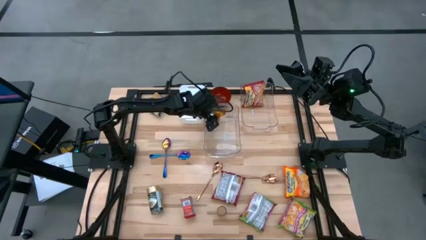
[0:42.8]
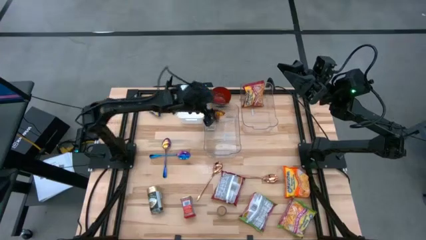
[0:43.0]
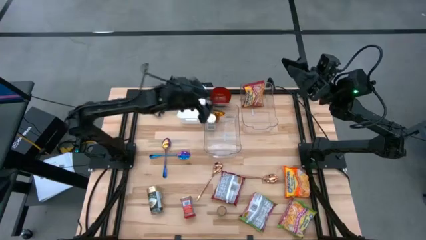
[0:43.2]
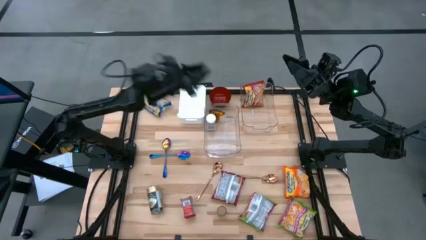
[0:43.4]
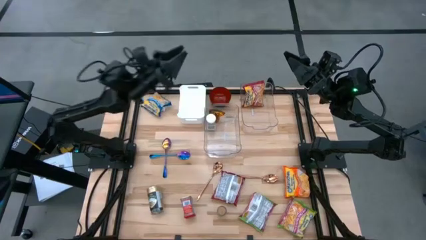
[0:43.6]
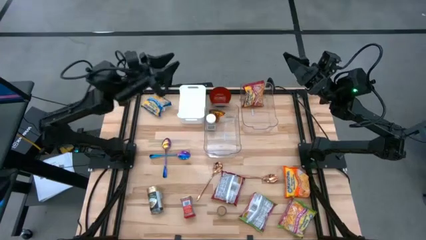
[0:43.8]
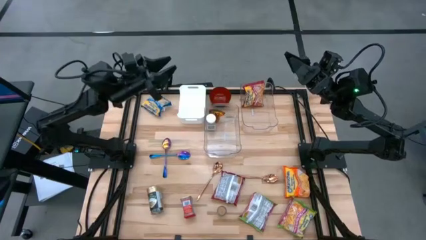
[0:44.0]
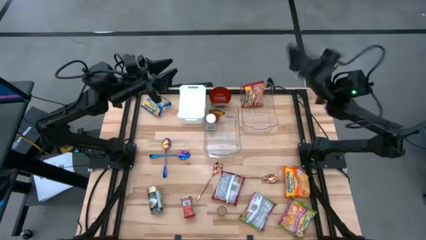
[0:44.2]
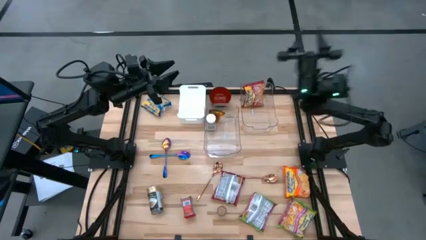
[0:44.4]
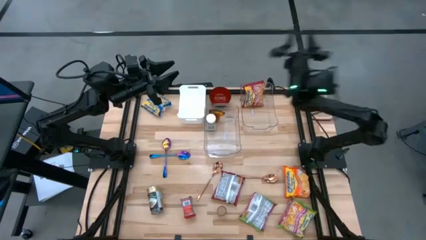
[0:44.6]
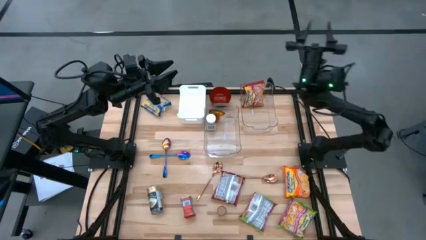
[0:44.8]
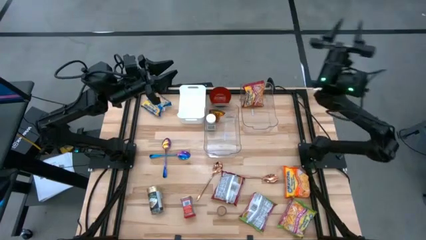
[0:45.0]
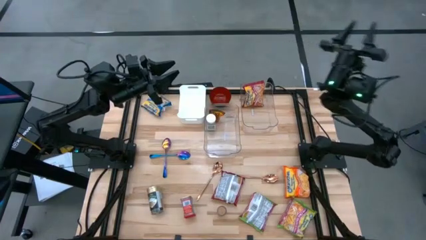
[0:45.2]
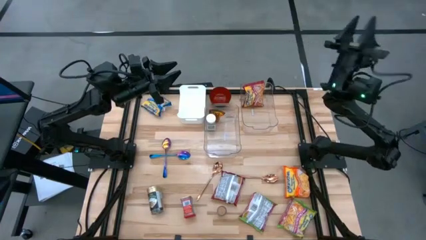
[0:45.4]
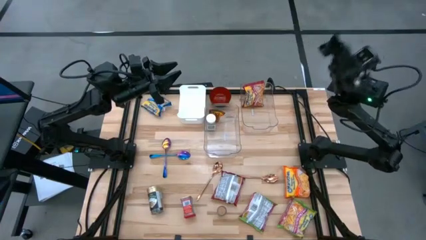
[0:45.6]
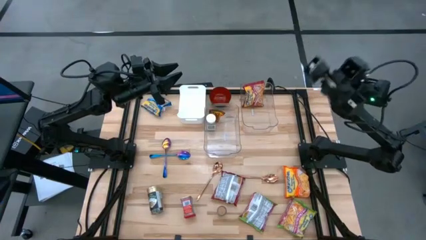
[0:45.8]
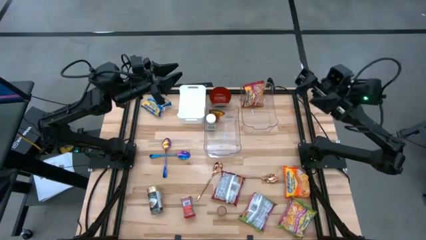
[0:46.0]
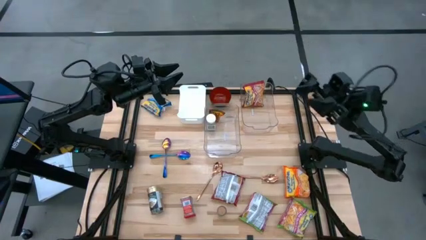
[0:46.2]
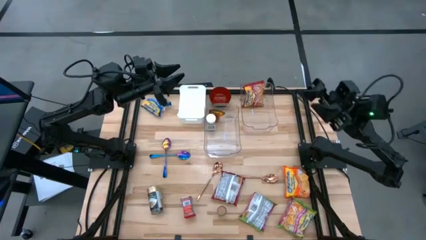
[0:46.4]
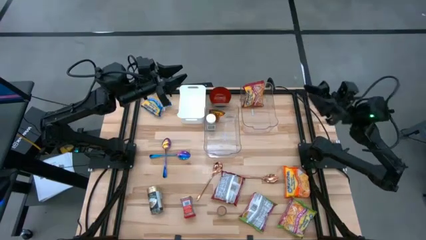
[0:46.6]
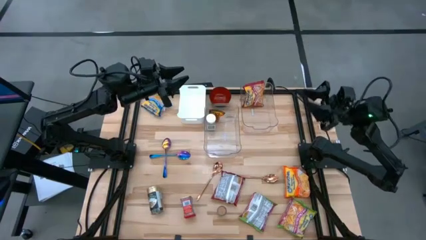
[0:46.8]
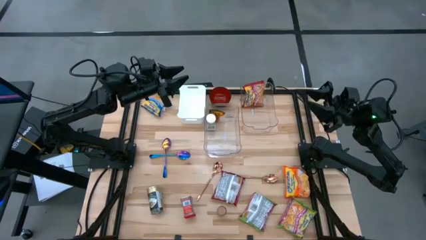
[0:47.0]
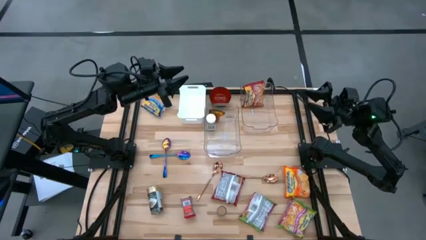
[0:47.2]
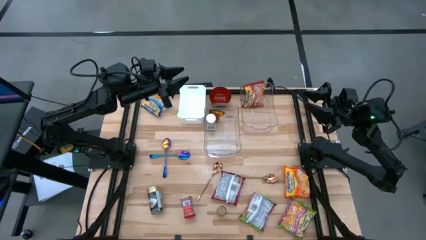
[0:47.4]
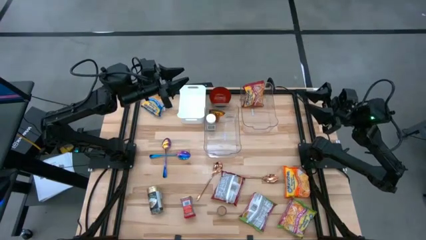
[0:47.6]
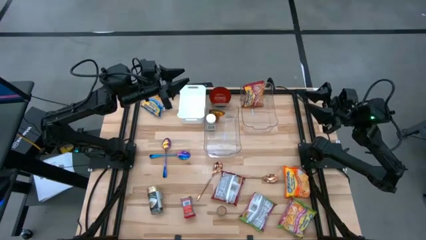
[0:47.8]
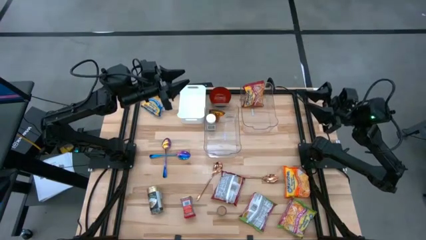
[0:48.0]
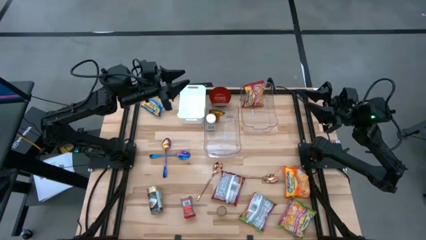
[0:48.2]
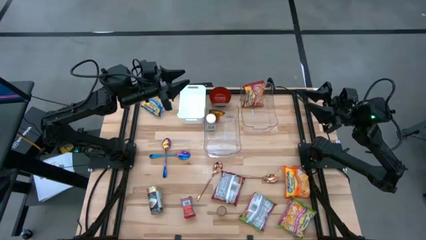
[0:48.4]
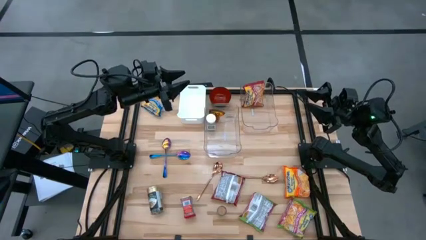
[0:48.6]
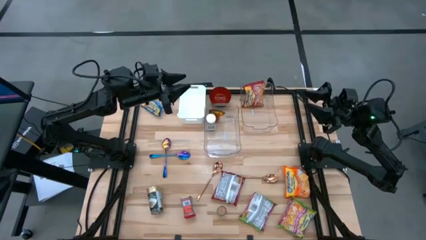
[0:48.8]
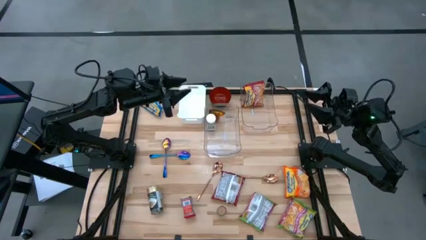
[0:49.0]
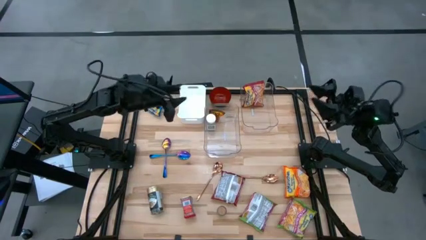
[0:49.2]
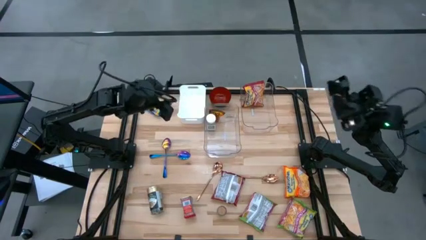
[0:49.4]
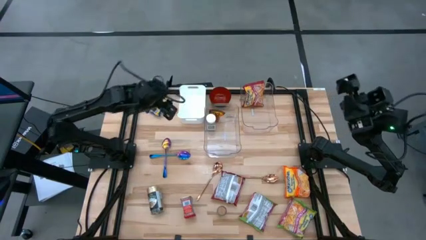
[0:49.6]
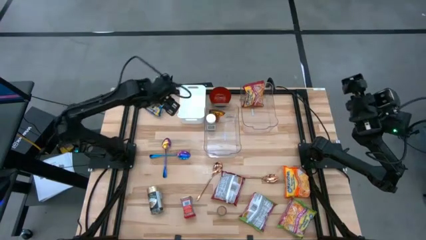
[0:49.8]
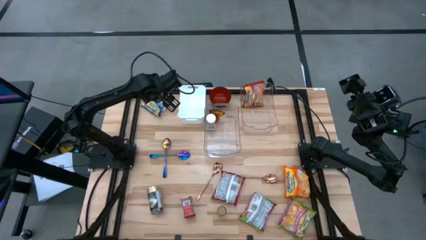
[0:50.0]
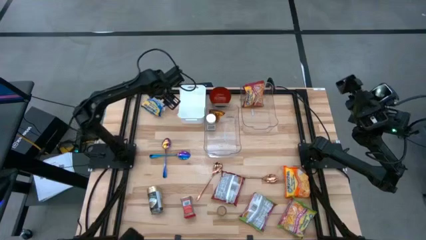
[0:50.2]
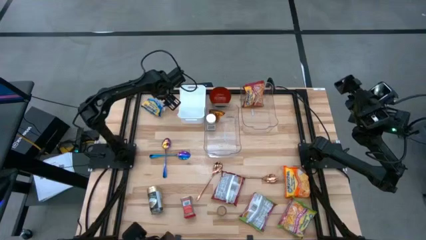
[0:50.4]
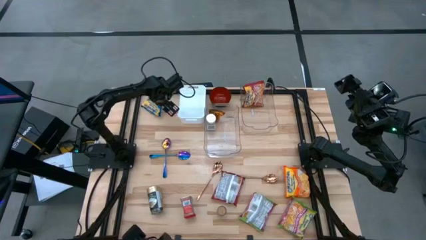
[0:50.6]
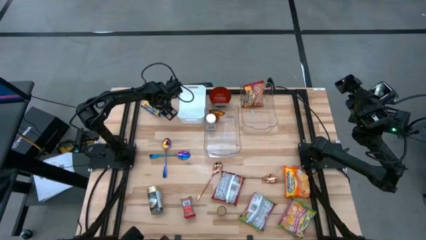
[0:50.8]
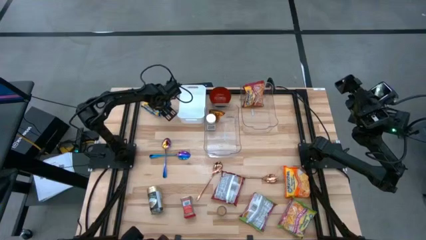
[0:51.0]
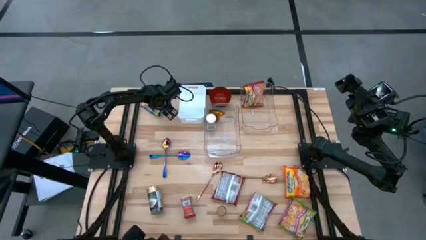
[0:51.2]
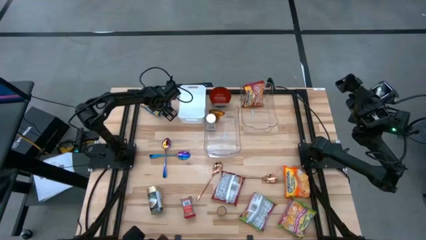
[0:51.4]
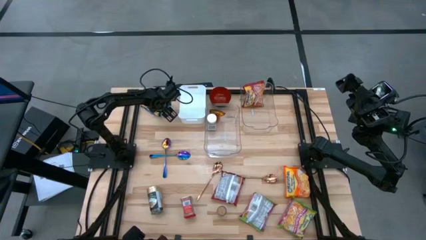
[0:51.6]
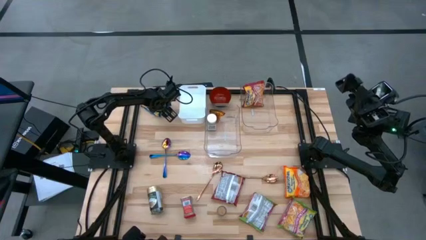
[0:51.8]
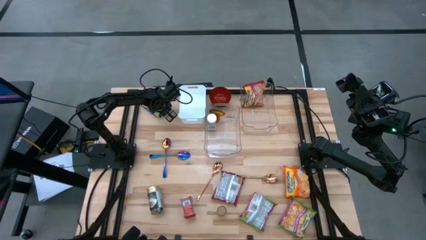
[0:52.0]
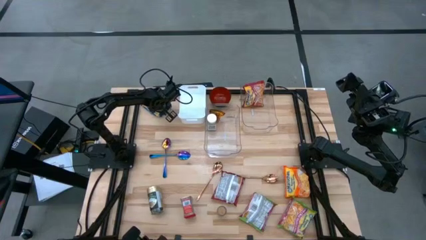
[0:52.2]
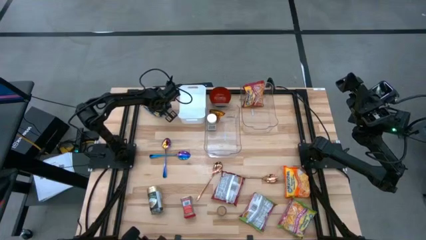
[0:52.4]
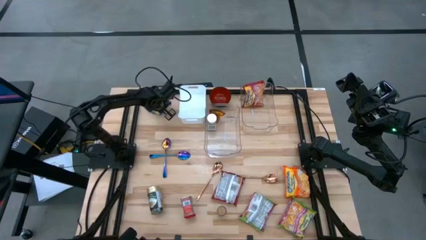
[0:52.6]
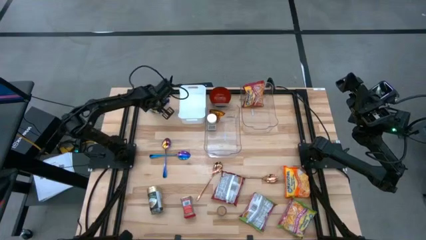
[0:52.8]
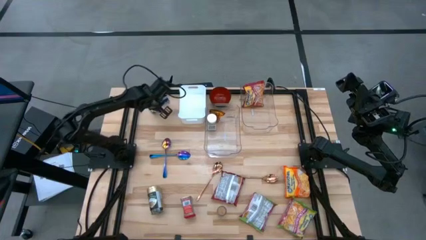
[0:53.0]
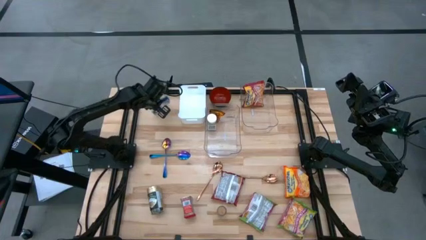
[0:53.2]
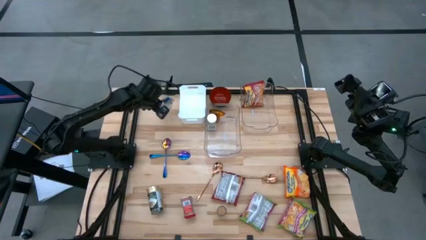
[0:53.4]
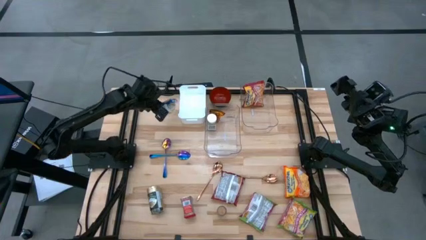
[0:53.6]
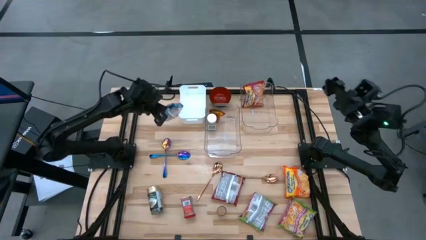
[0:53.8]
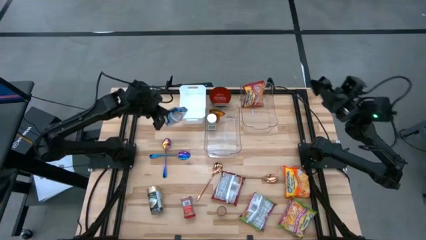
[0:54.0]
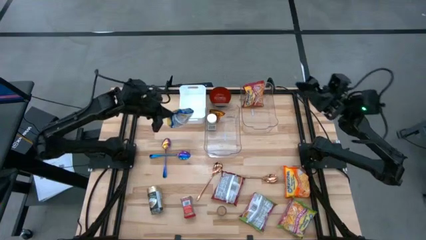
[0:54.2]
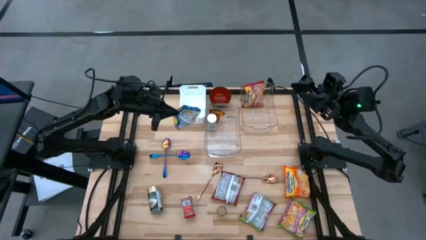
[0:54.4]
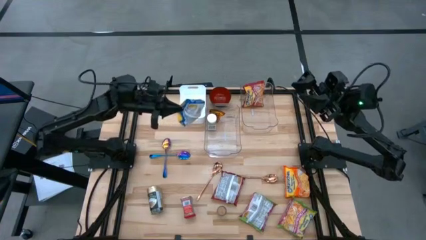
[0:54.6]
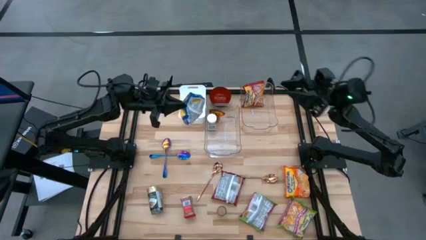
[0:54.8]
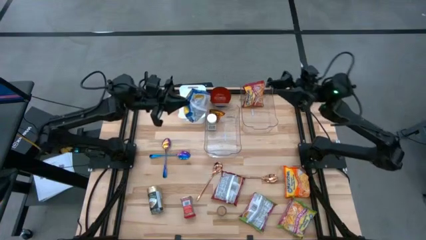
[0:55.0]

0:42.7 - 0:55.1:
Task: Pick & Place Food Item
Put the blue noodle pack into the right transparent bin
